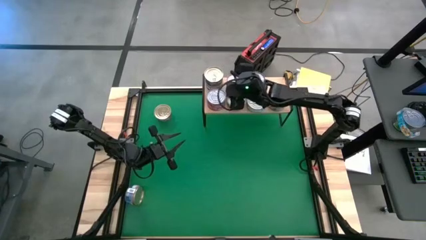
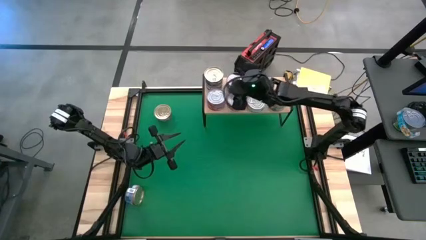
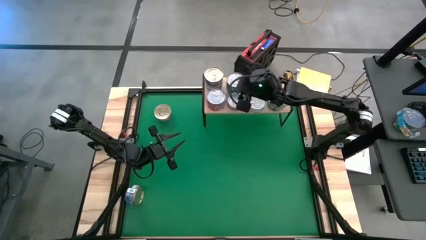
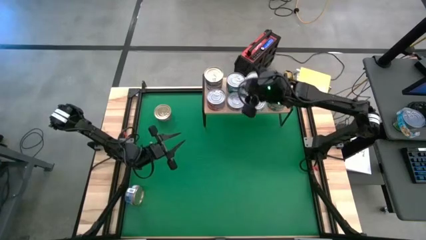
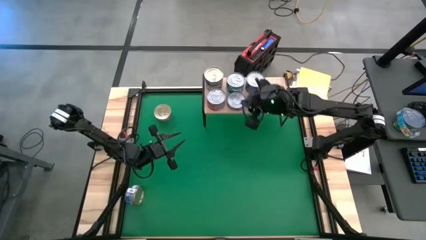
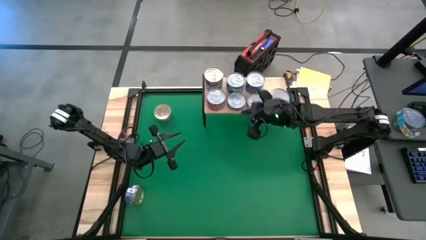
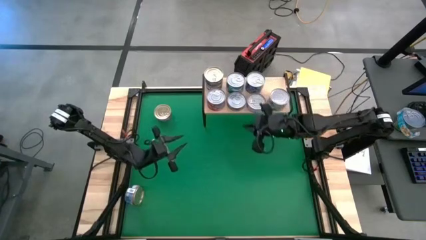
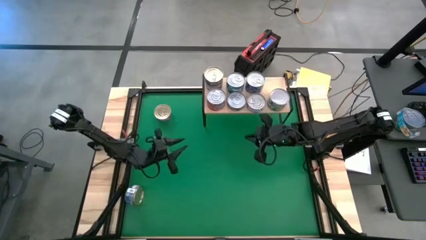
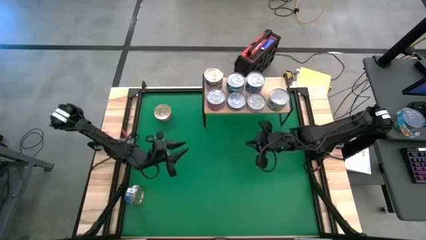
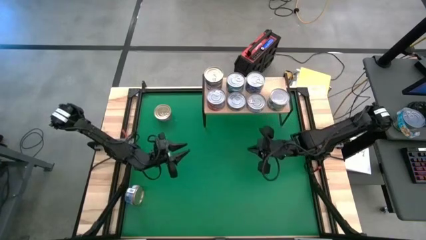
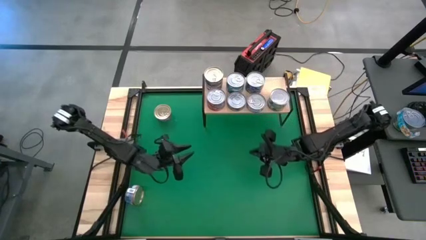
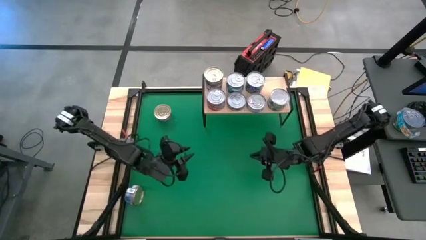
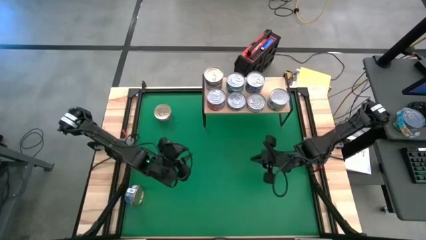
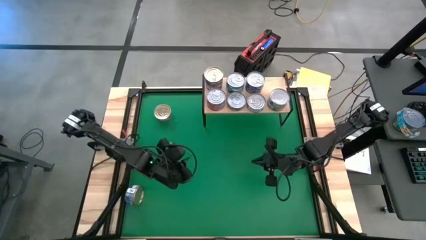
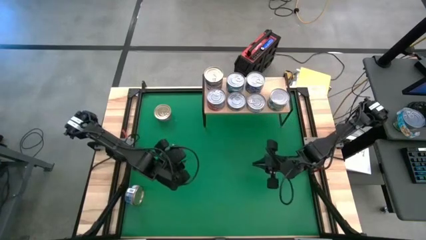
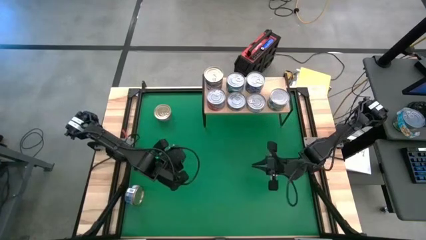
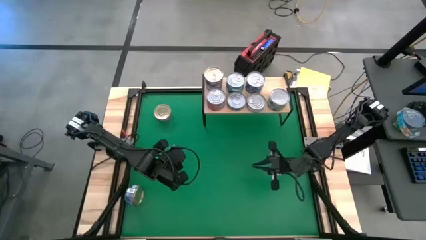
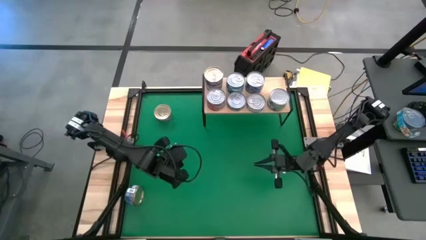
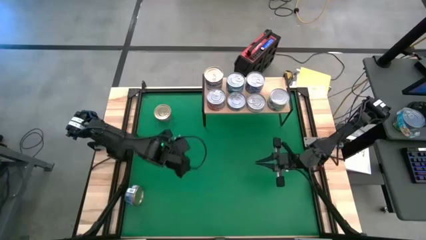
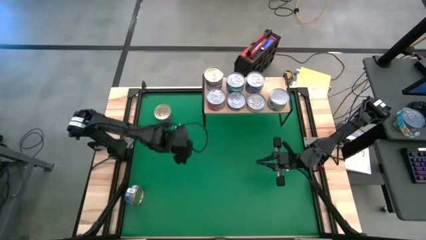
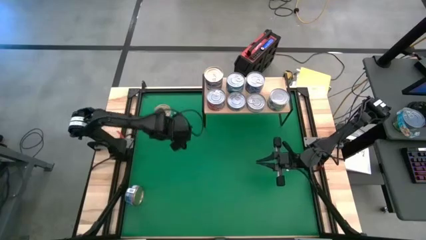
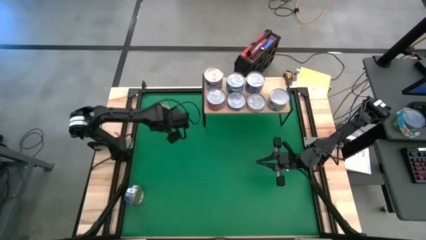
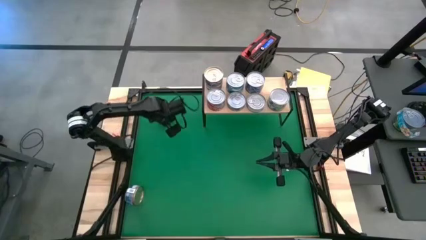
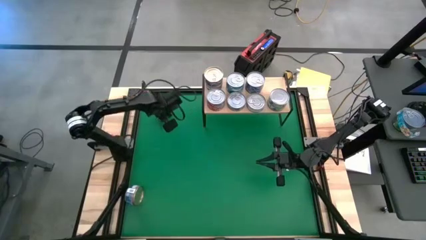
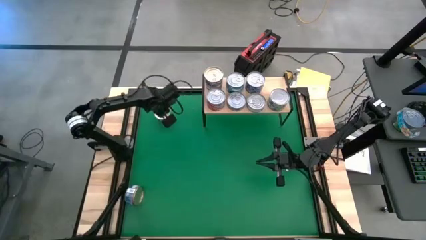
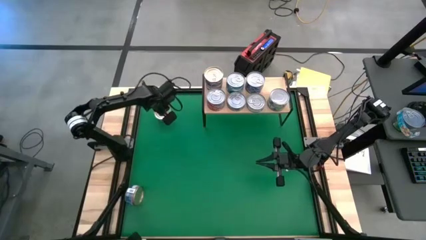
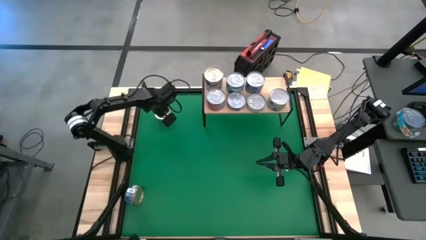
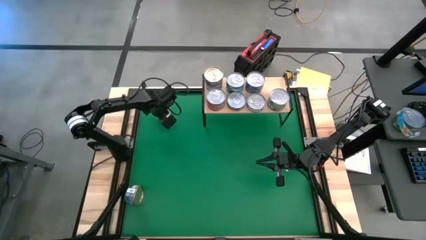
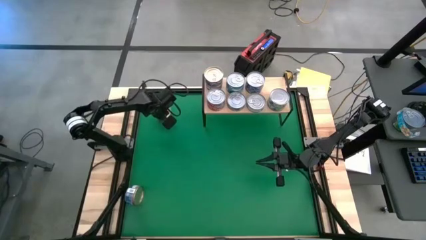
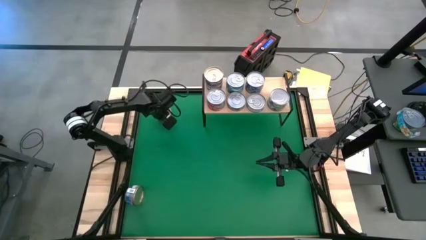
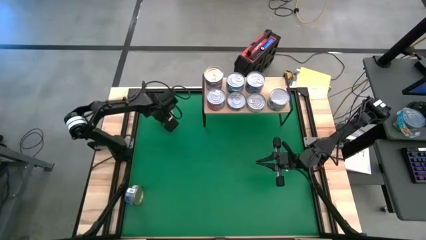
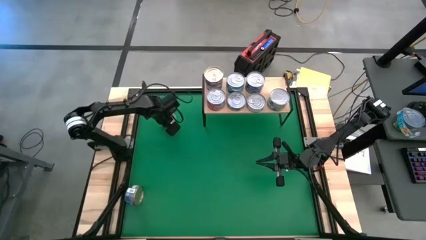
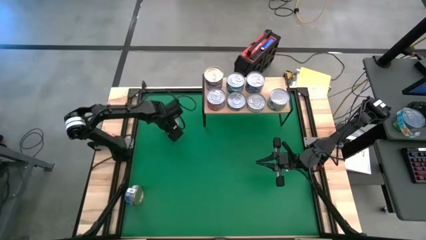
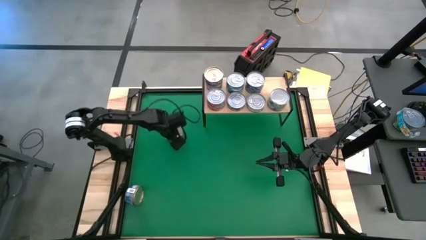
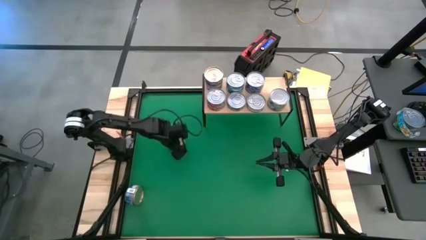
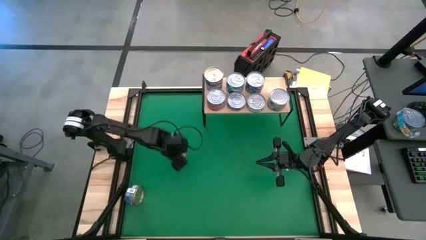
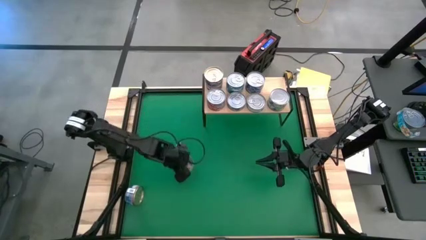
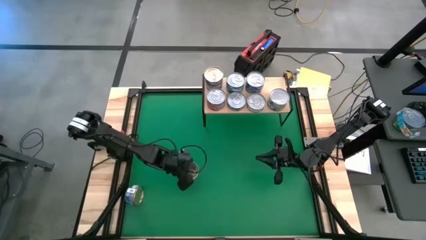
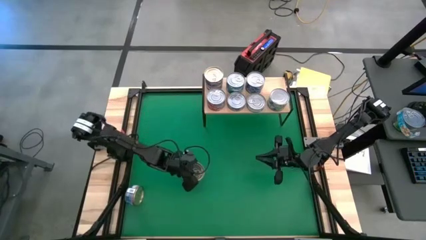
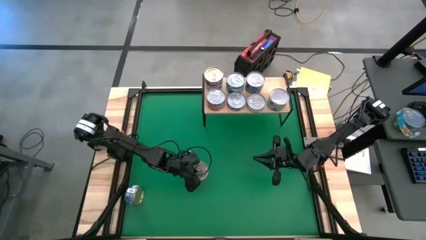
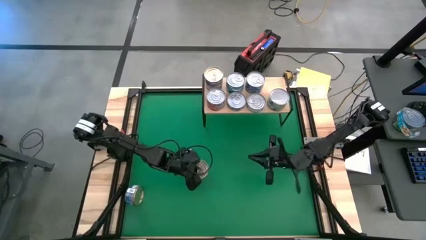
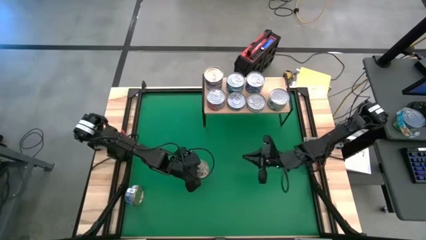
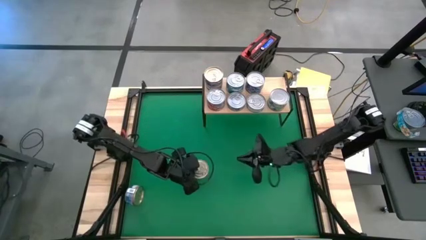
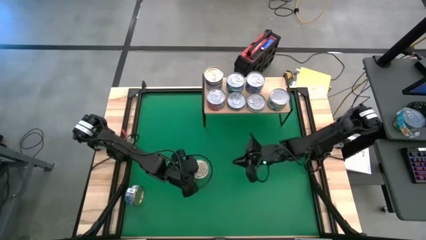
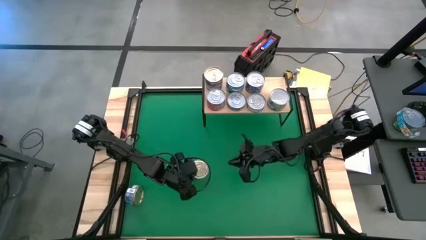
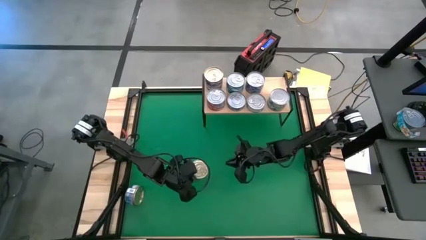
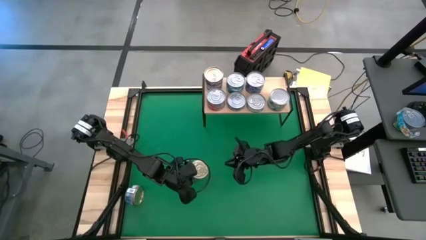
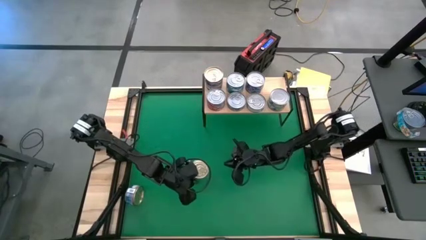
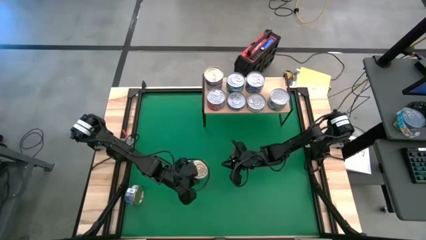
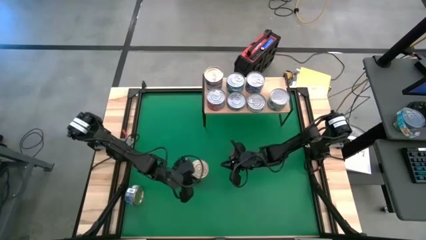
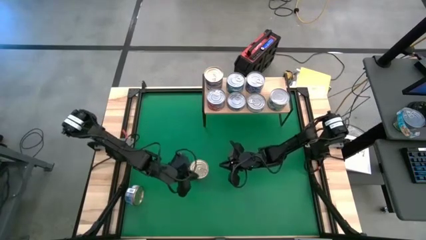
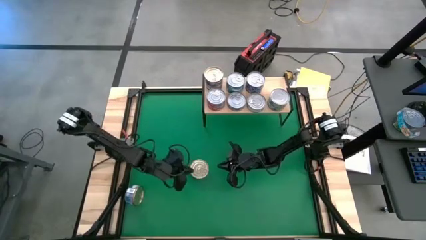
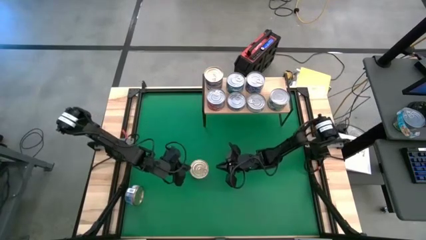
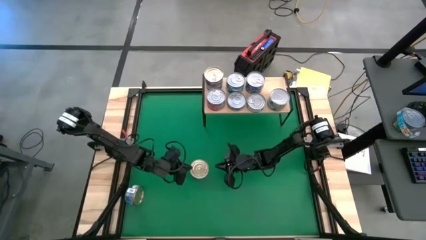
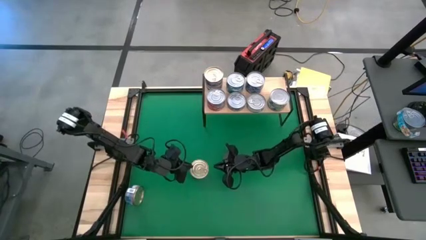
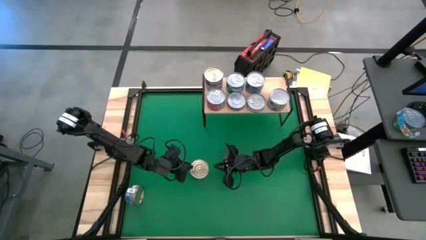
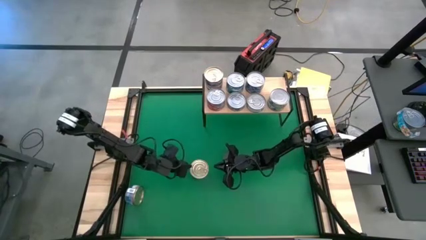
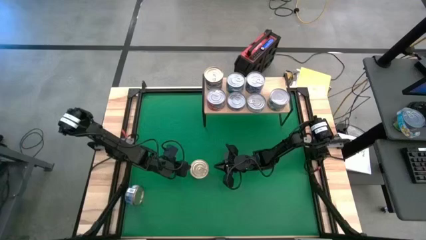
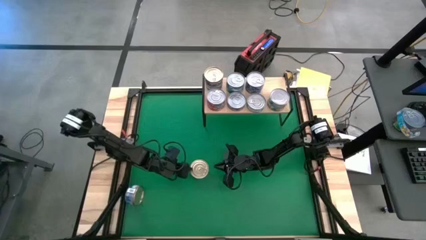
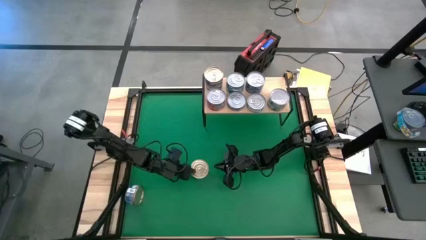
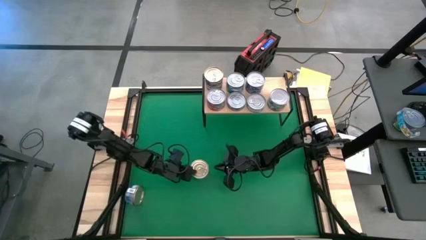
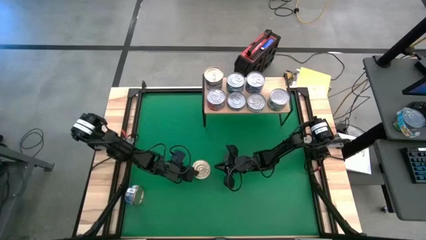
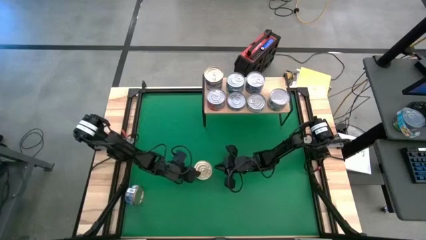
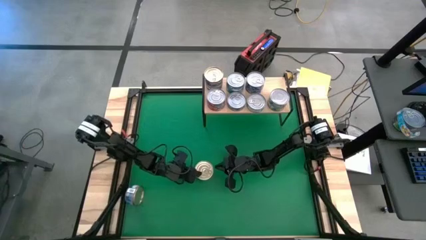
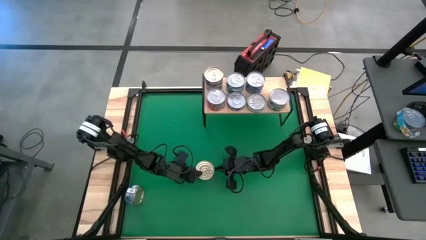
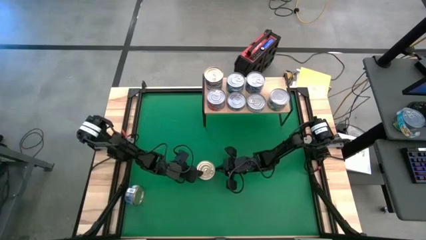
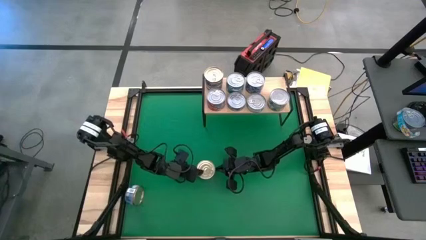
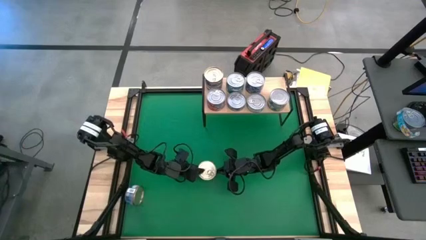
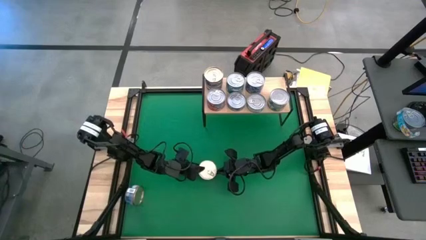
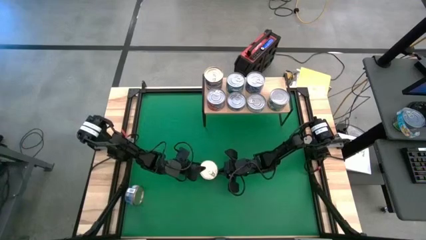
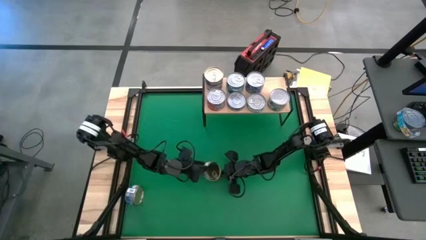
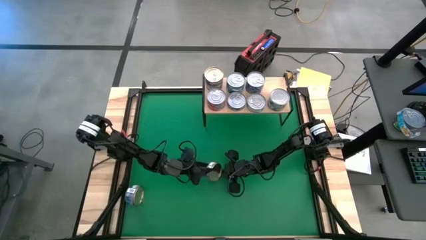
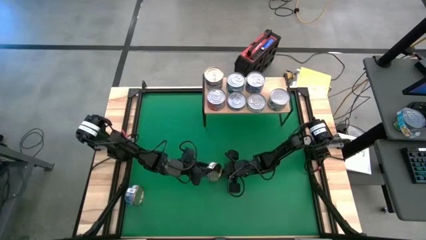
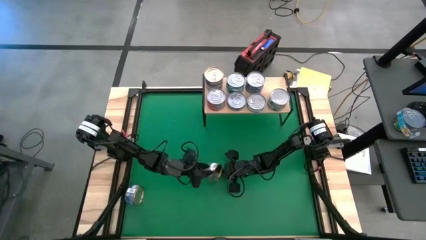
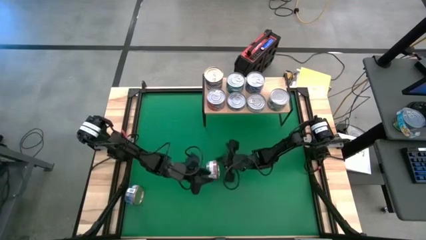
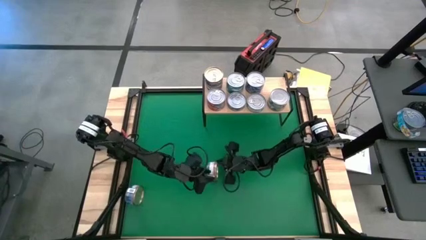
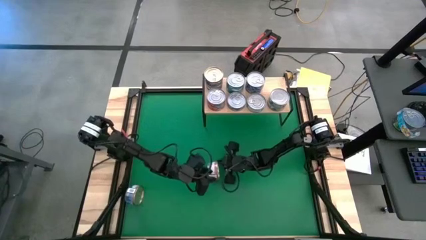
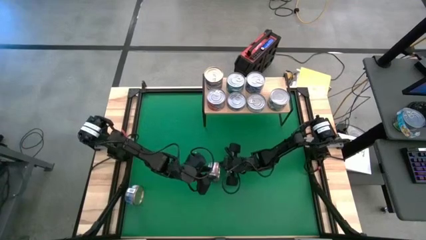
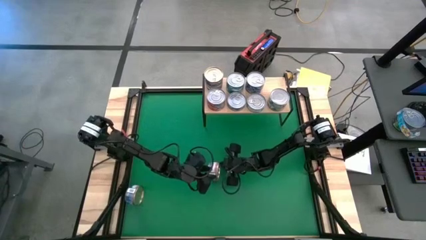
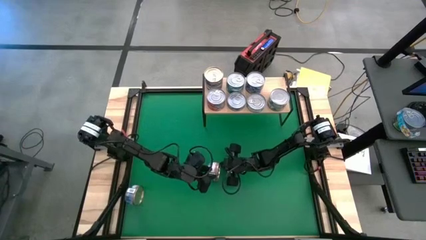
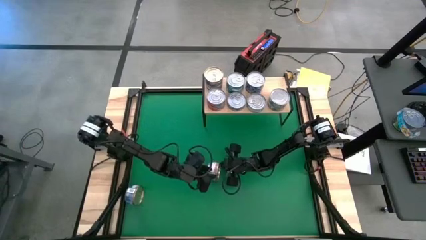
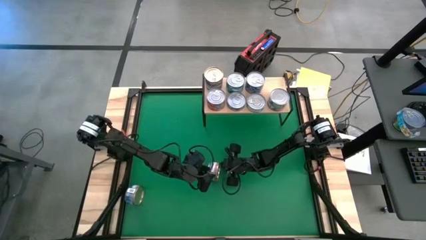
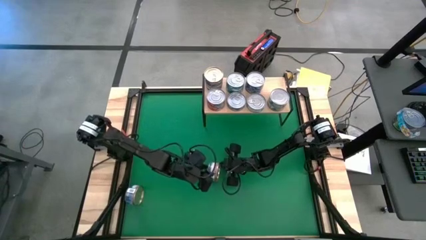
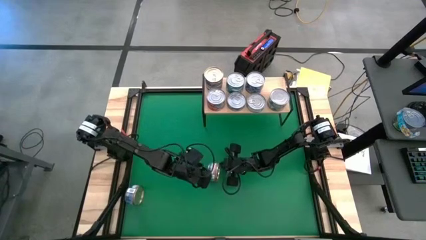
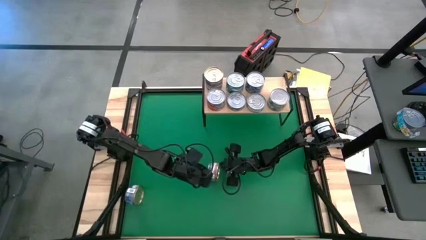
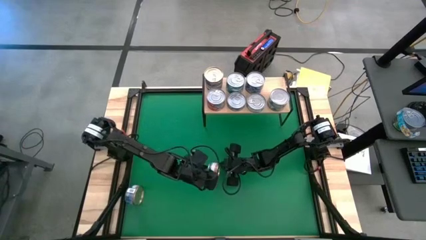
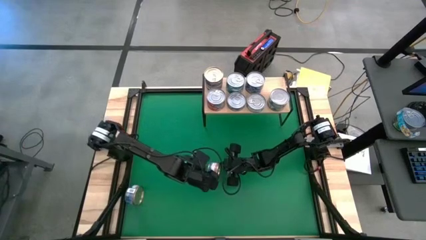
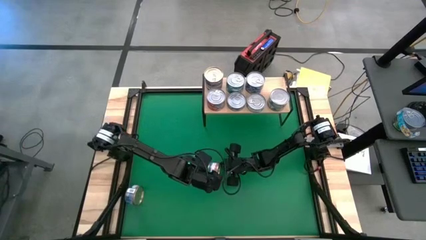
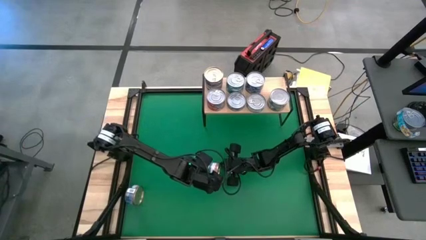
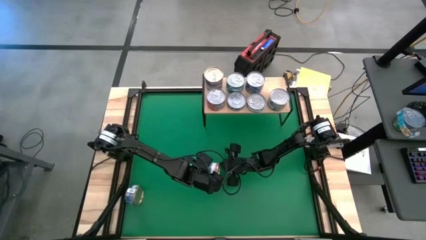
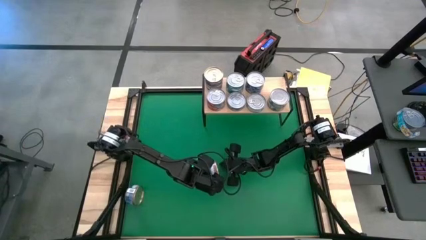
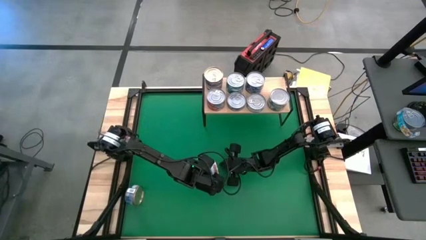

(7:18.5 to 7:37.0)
Task: Stack canned seafood by type on shelf
Stack the blue/pink tuna can on top of the other blue/pink tuna can on the shelf
